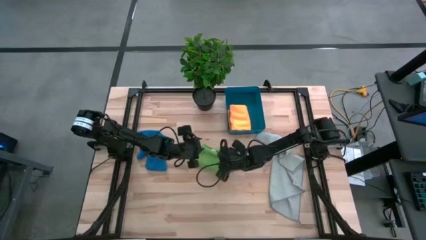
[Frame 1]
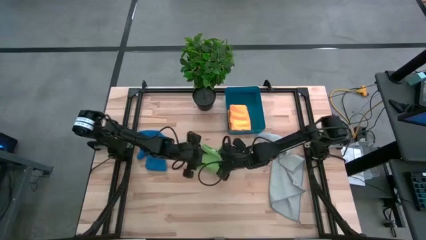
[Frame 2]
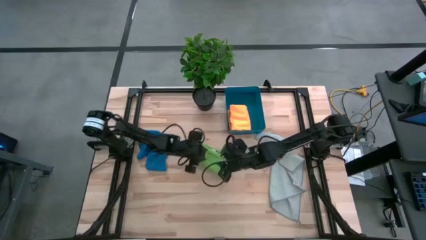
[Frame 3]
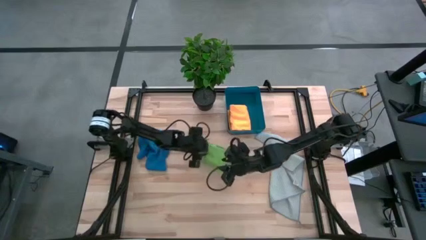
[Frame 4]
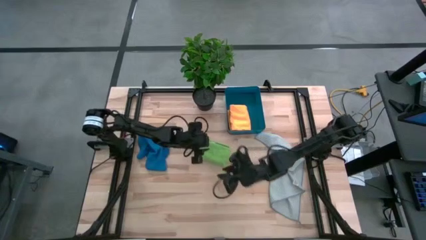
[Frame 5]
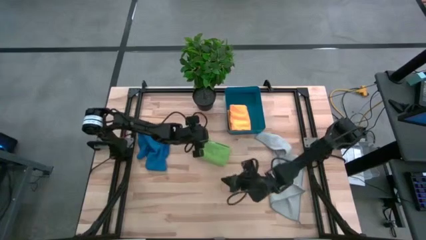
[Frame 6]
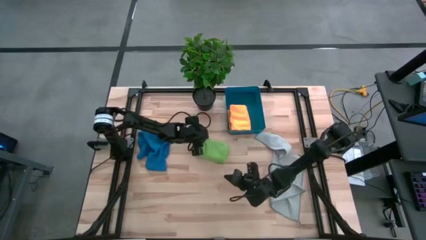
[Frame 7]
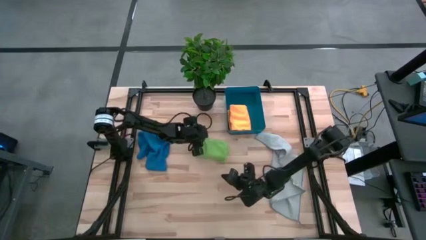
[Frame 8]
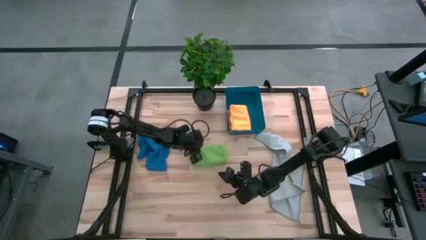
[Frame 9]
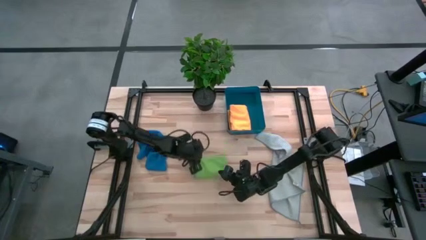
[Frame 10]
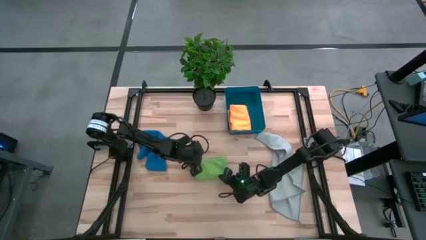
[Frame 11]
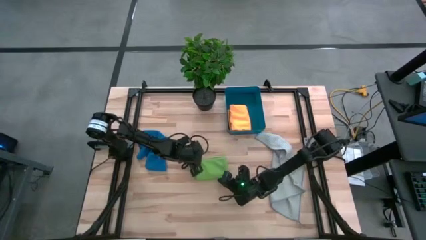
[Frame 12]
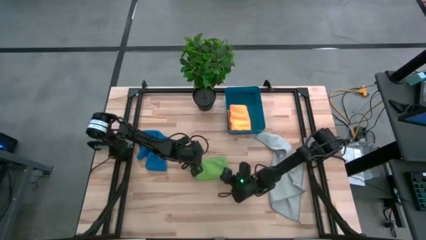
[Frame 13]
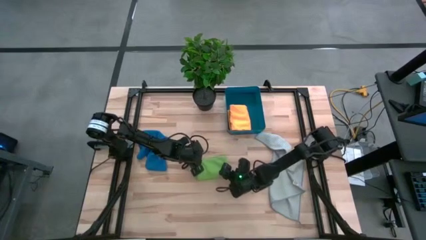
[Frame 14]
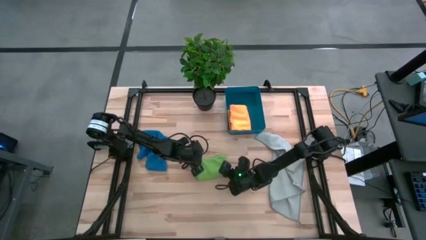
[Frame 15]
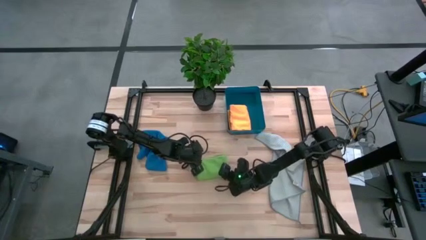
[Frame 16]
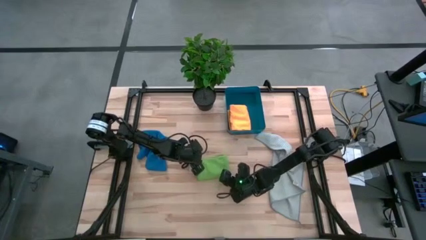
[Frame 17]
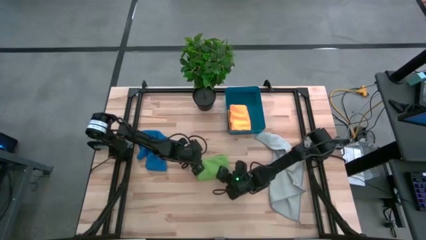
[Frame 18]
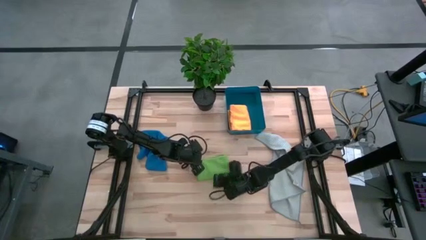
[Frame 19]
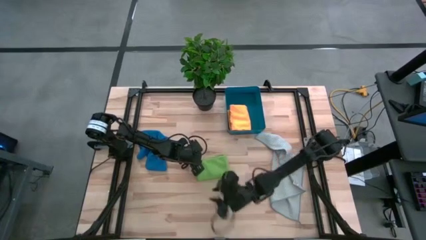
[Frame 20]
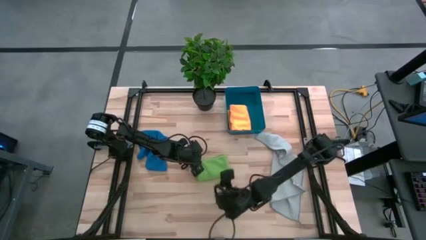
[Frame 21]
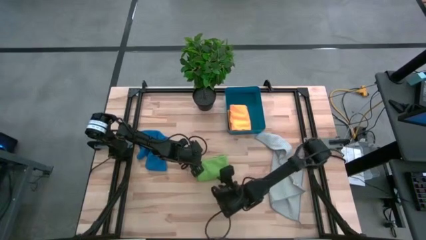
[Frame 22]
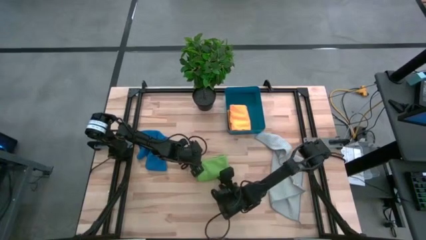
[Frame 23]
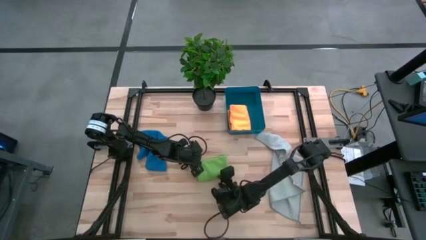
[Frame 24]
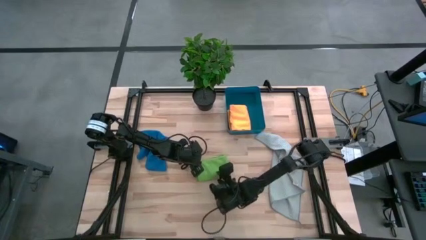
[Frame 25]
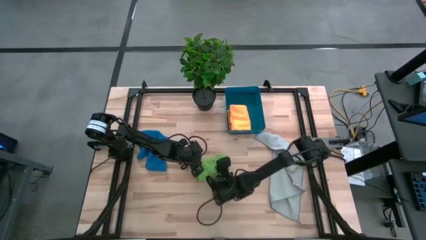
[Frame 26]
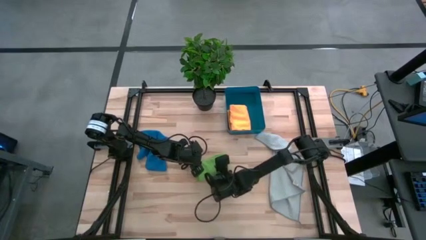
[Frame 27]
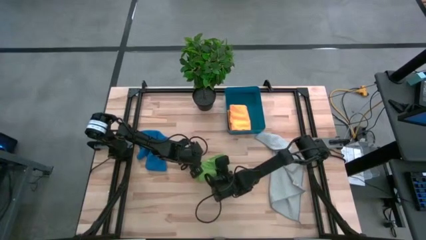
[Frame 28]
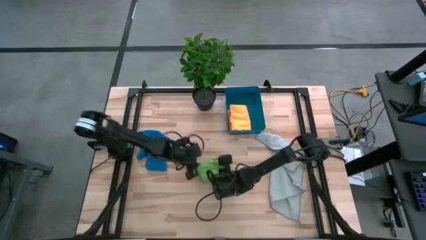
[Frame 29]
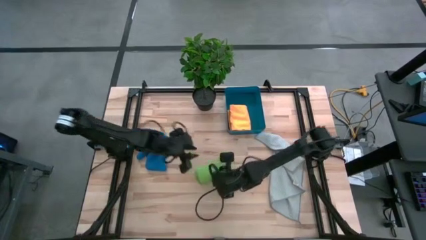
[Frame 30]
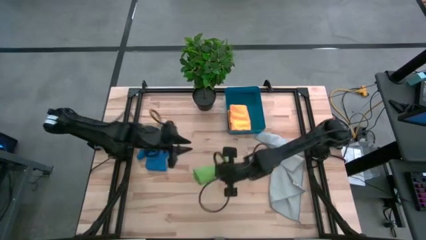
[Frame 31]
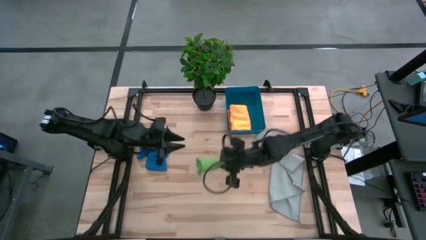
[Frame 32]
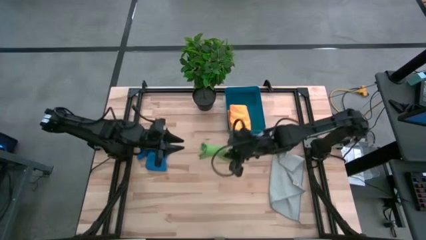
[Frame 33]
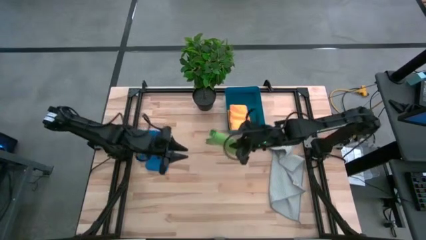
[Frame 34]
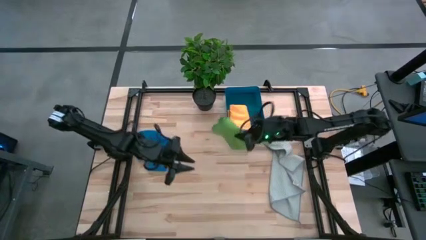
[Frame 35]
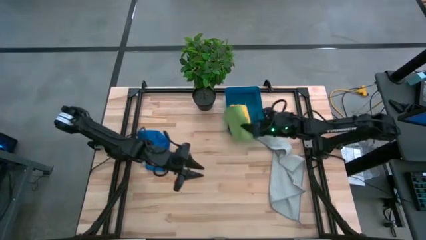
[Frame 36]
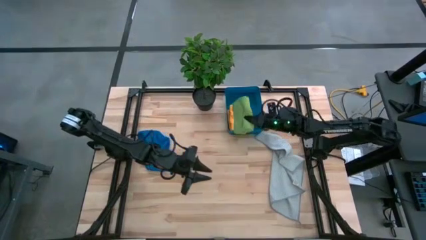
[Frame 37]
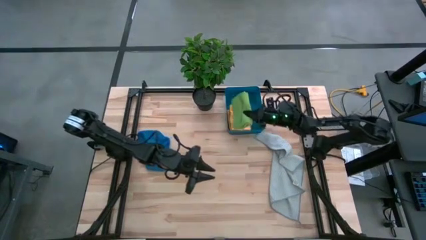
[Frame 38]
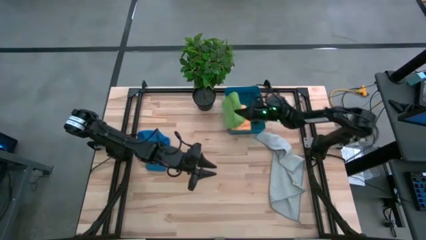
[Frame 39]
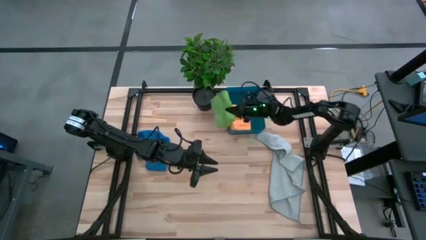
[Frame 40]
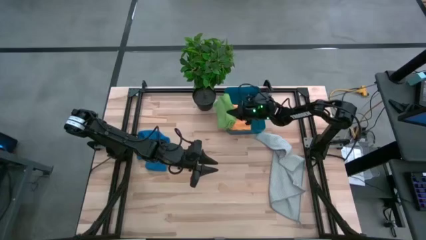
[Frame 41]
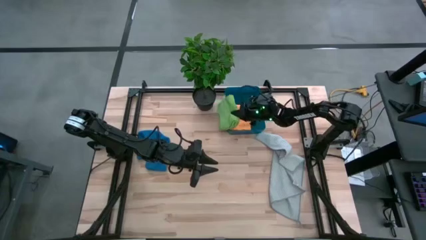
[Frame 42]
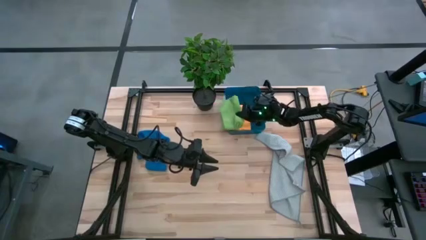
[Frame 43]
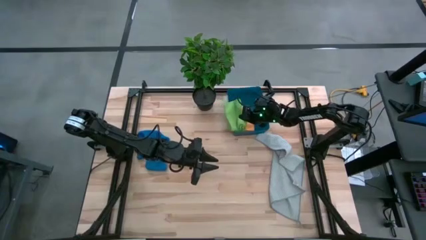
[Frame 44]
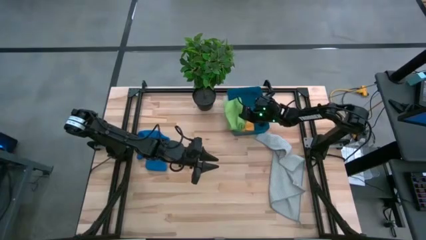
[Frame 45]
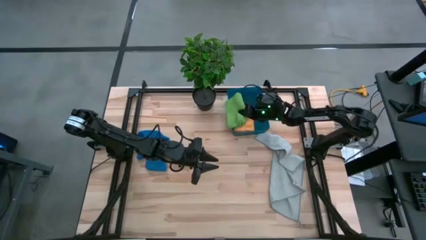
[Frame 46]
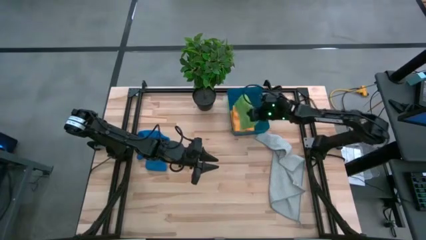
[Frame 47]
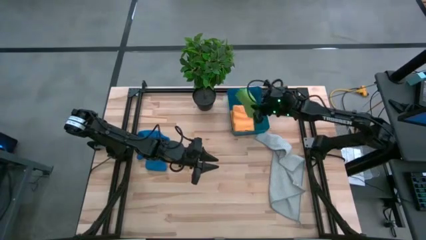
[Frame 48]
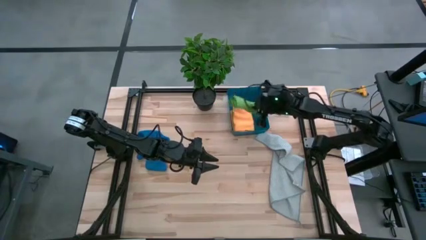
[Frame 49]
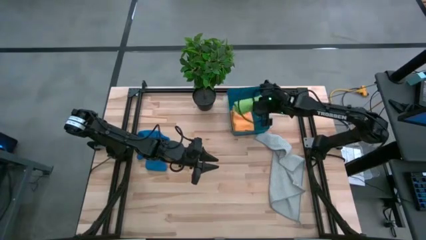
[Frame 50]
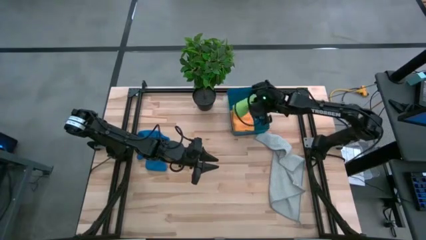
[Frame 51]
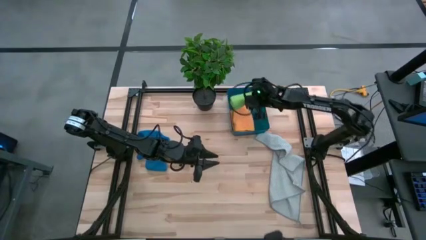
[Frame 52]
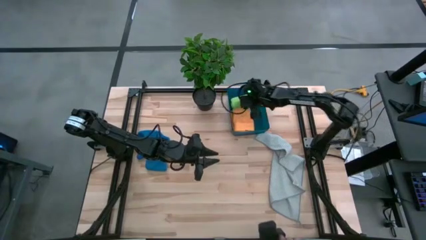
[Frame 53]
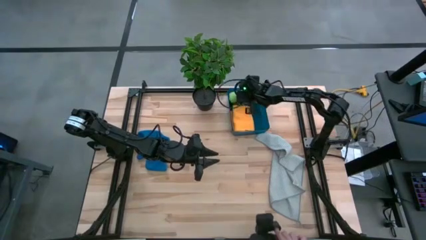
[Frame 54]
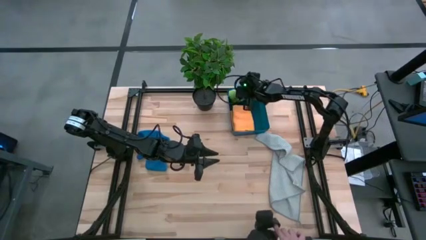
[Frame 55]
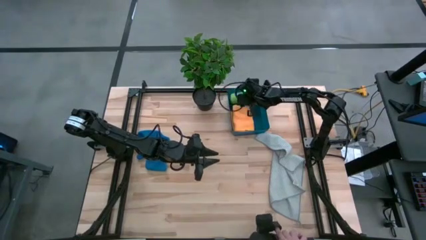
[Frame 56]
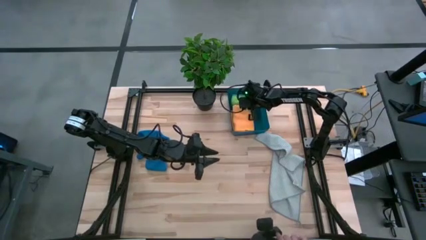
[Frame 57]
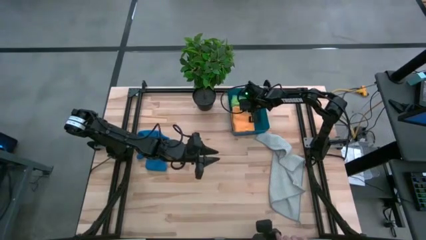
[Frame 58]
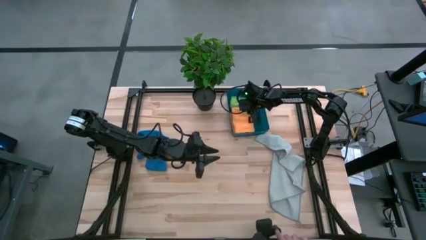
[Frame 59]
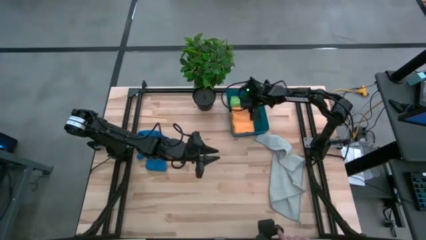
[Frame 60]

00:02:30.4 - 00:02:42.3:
Task: Fold microfiber towels
Put the green microfiber towel into the blue bin

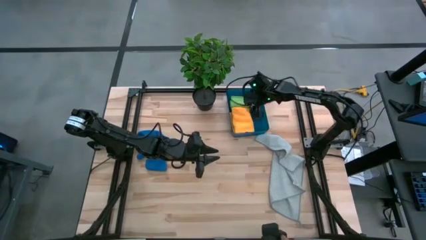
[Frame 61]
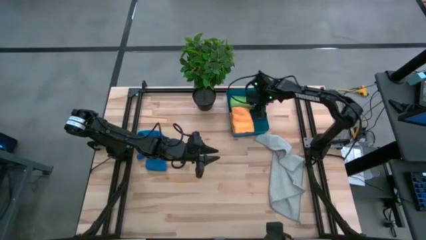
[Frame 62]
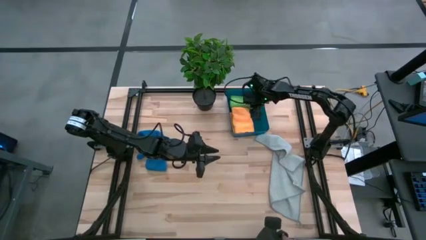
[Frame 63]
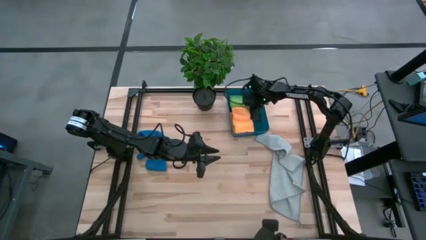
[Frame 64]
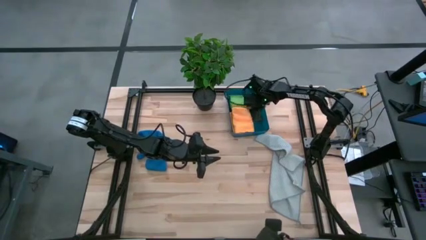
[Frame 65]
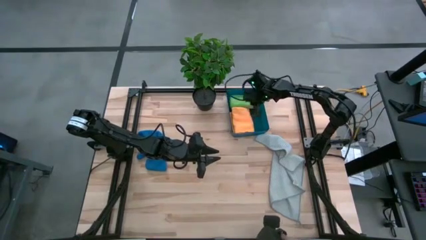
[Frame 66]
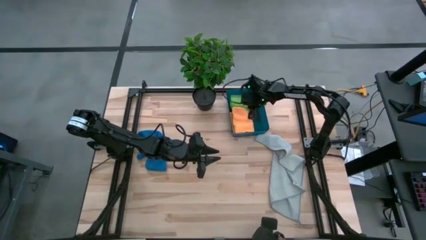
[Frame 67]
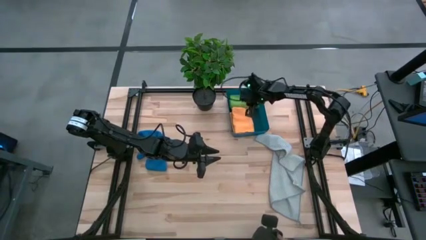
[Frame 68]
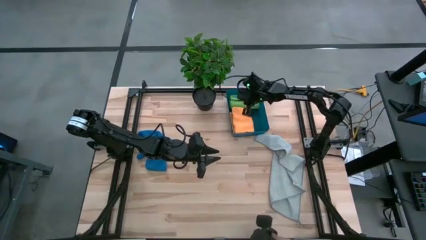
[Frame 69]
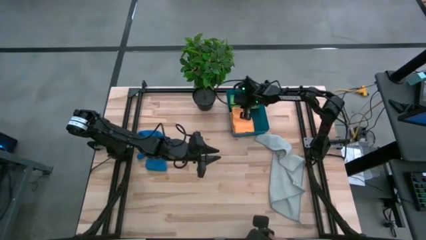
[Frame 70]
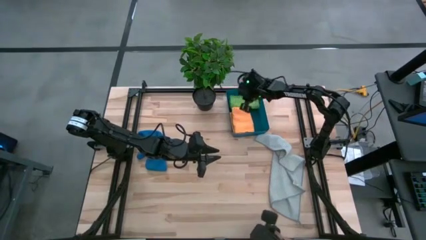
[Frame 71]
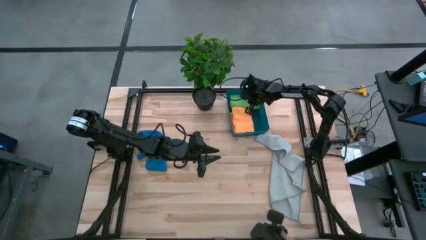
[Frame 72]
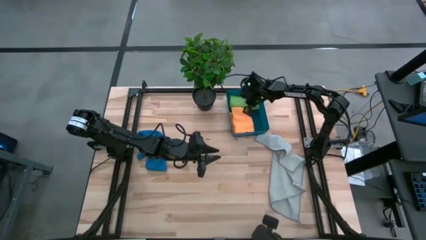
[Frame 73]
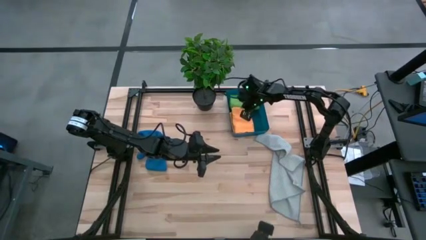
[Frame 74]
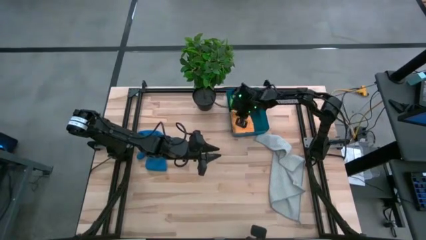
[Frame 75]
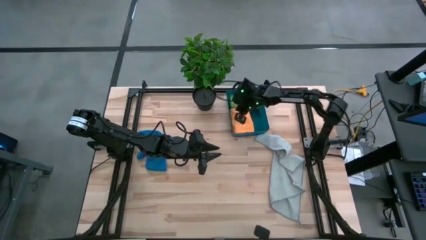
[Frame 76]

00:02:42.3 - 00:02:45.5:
Adjust microfiber towels in the blue bin
